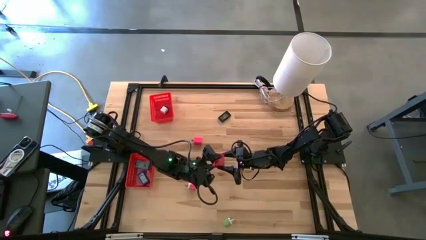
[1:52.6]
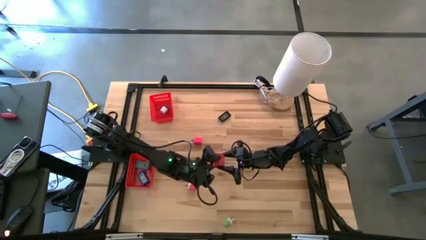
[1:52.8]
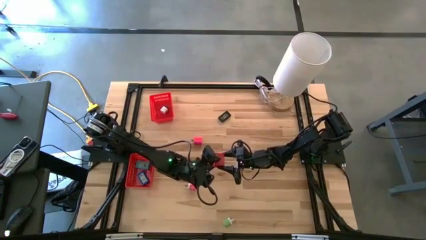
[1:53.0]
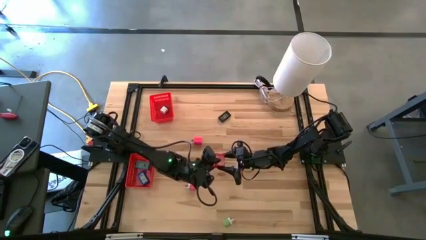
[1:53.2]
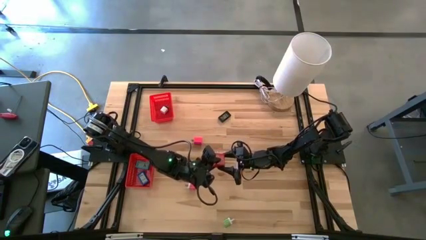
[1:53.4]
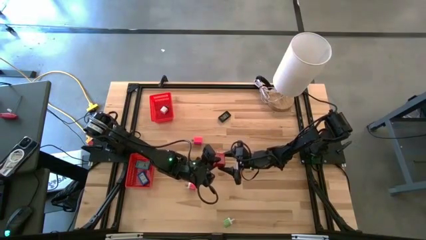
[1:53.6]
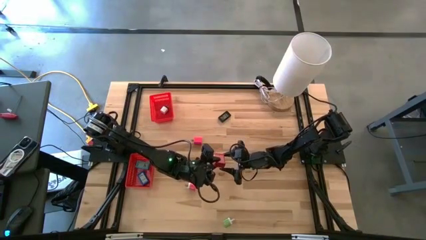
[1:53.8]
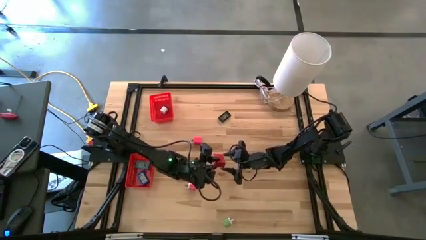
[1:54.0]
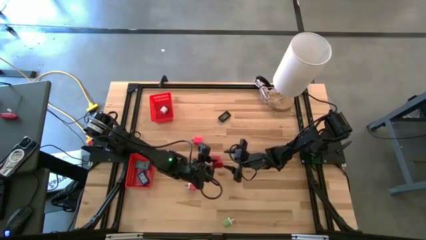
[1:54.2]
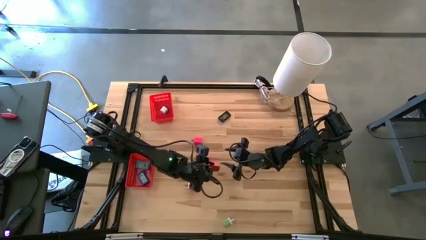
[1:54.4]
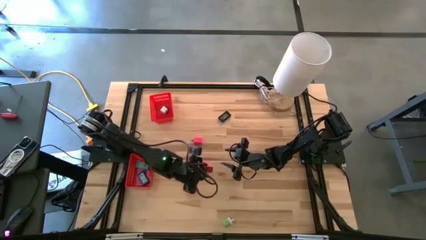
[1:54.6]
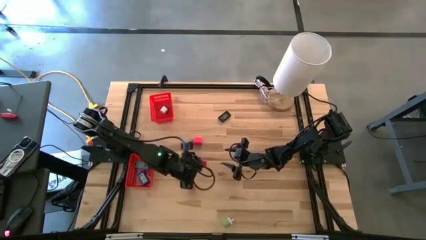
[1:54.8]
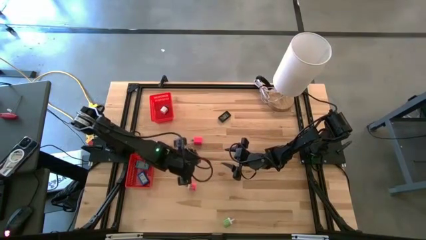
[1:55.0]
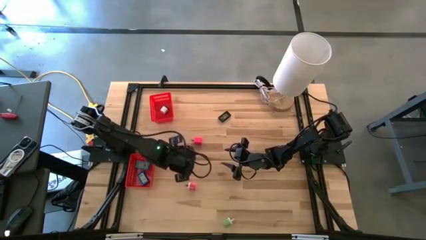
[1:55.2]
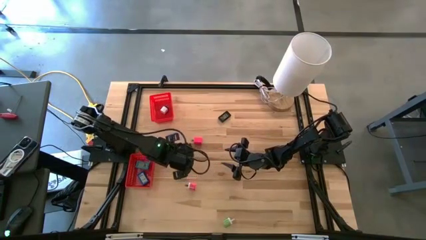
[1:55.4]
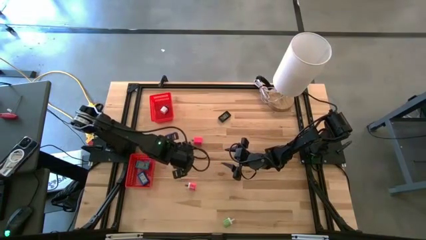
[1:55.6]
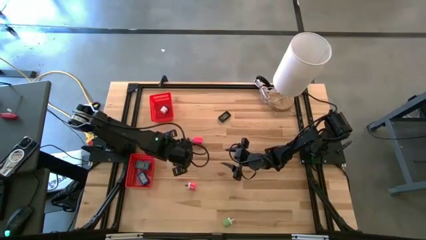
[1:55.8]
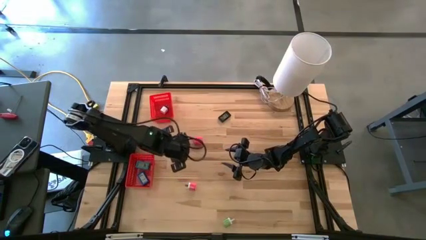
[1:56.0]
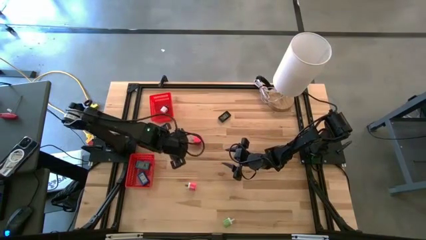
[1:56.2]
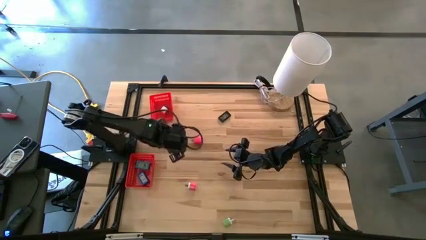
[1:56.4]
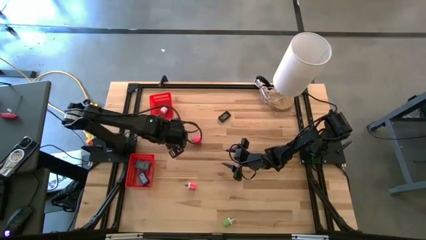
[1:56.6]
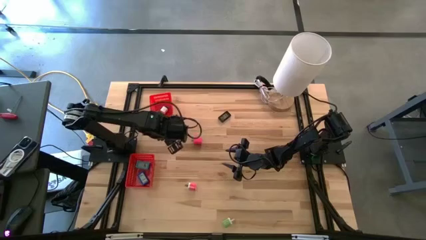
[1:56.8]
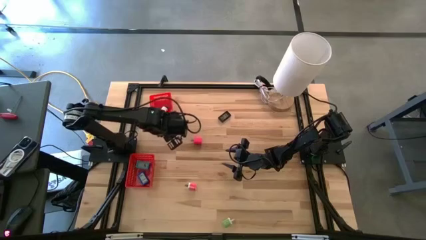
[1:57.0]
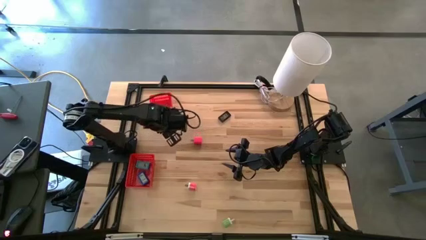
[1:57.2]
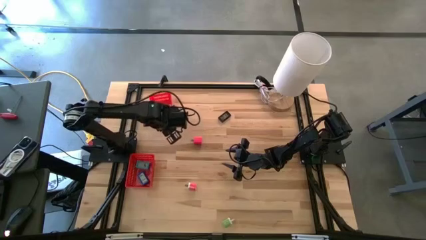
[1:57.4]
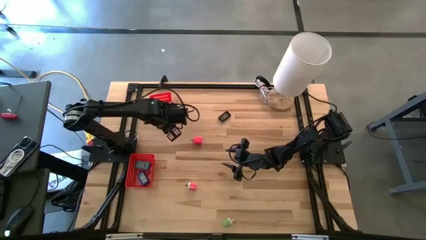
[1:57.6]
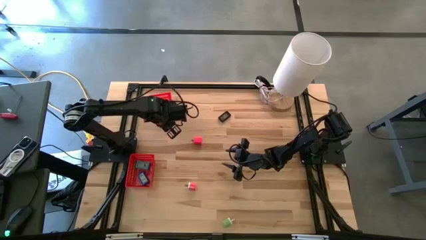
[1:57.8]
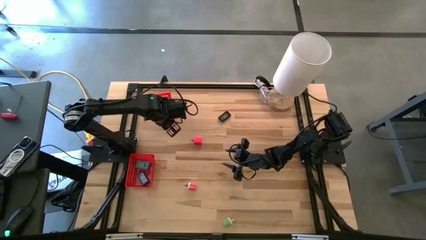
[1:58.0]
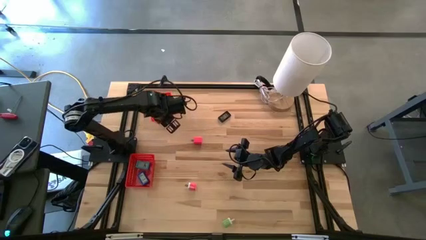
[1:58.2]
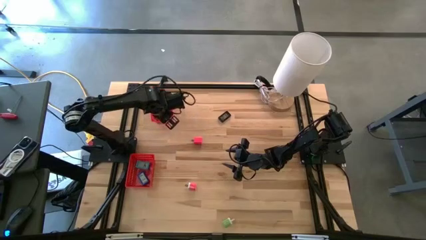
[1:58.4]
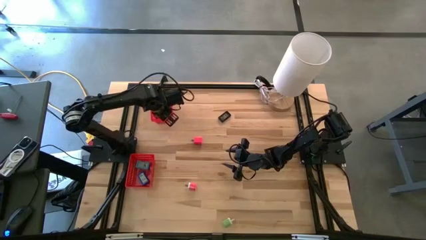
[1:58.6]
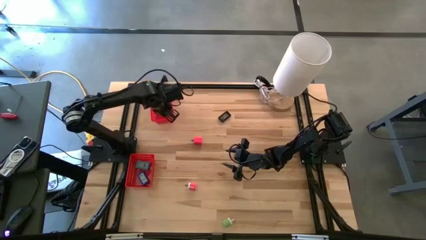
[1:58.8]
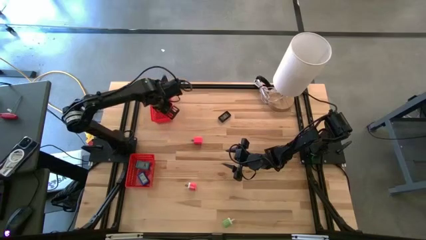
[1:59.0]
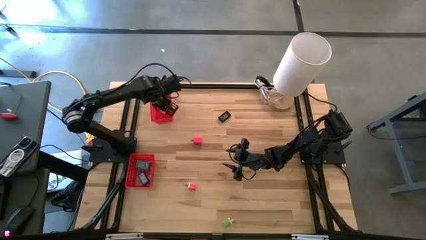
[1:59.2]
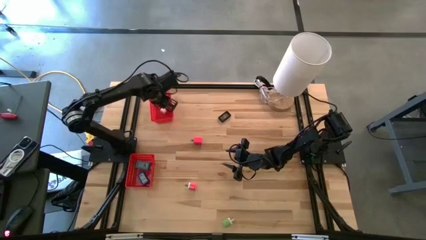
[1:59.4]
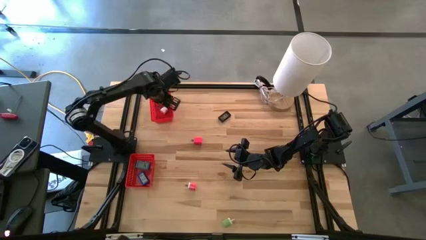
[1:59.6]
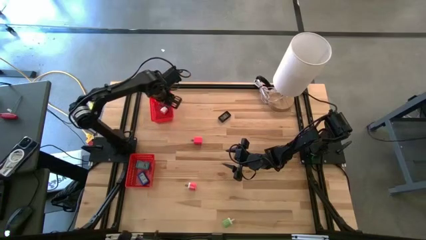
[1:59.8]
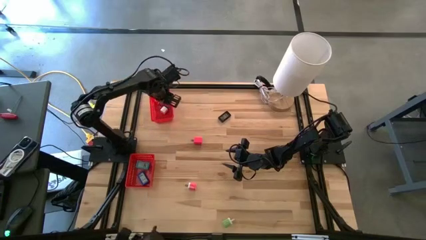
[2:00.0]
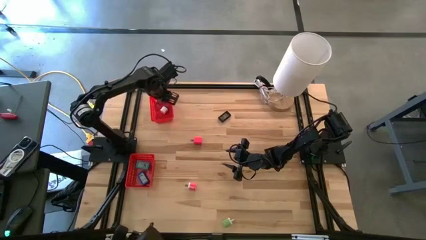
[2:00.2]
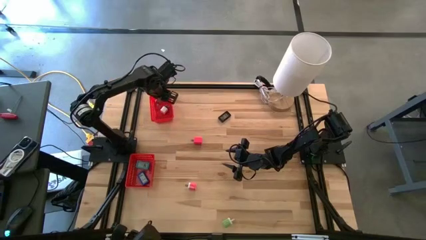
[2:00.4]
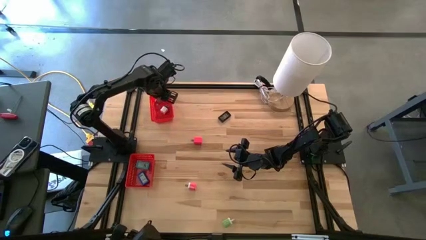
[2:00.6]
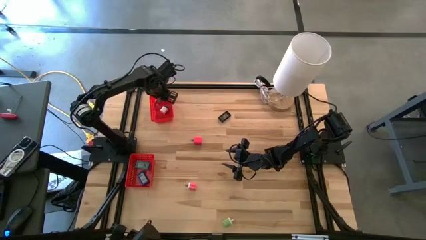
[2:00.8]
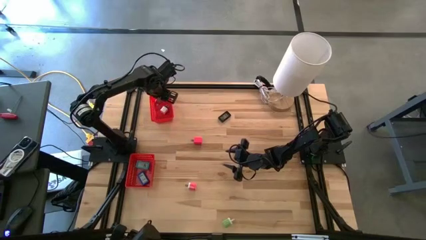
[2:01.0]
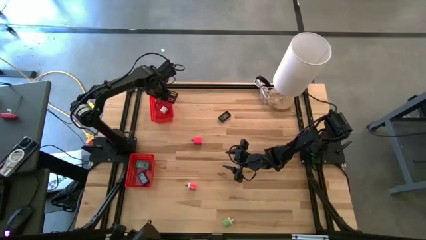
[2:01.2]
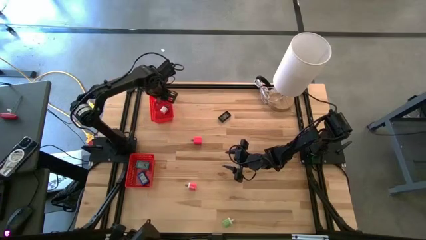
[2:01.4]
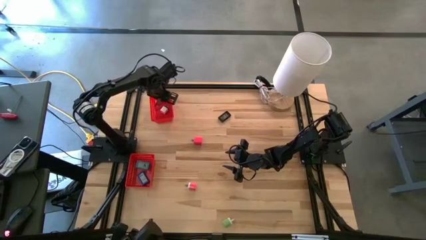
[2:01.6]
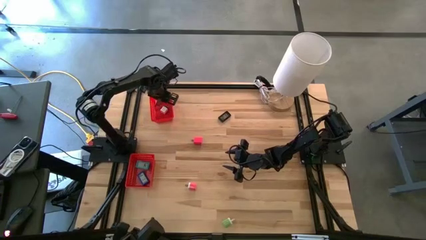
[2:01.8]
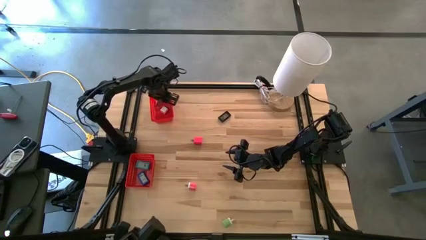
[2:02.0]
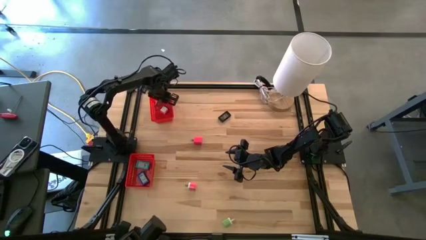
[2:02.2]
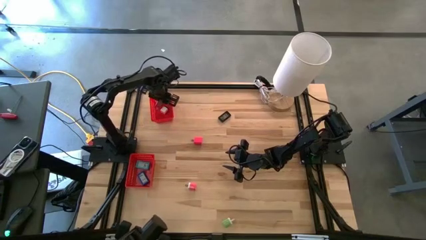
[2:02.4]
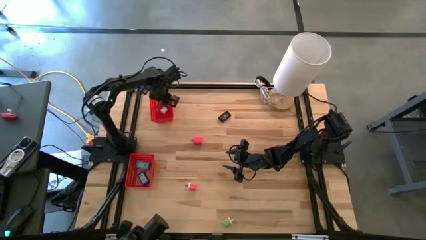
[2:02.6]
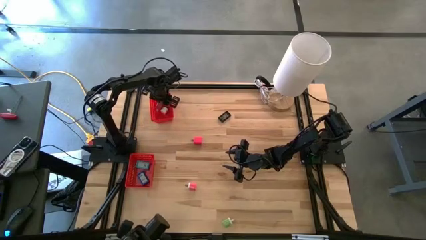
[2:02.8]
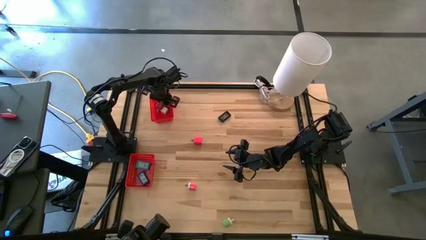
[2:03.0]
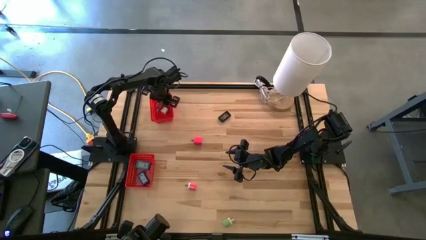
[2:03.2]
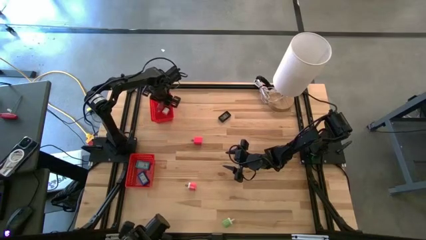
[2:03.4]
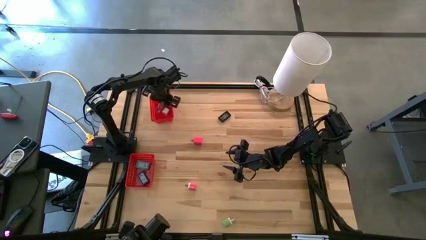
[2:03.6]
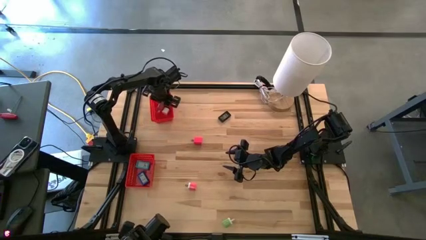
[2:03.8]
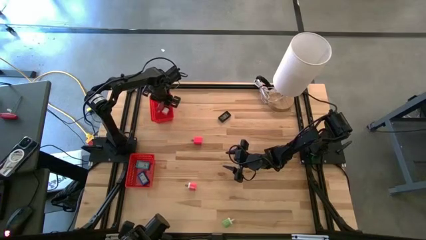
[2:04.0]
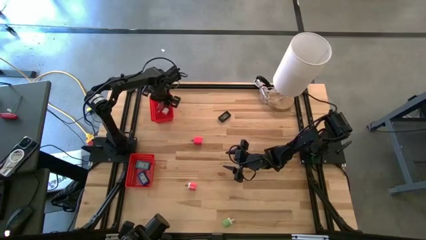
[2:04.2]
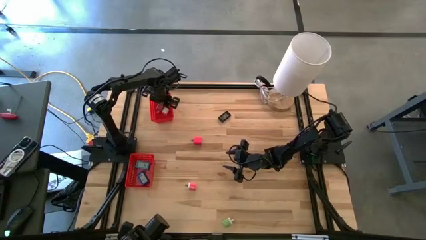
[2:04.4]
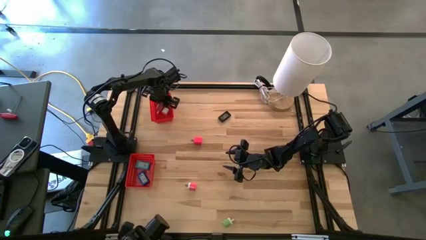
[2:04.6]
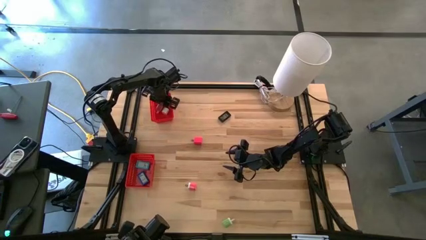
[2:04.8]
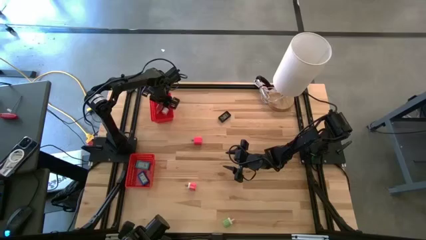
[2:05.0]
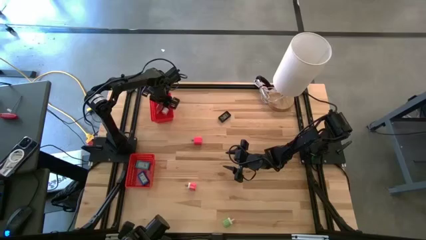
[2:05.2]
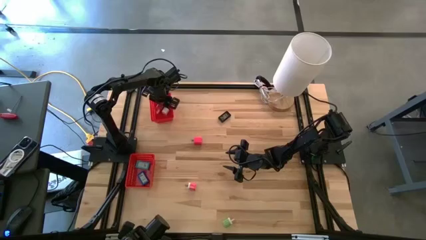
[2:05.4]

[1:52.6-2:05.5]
Task: Pick & Place Office items
Put the red charger adapter into the top red bin
